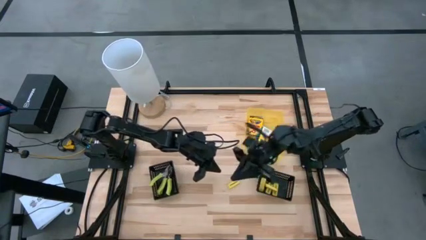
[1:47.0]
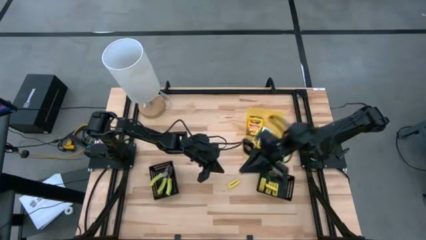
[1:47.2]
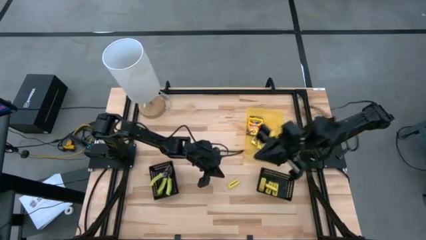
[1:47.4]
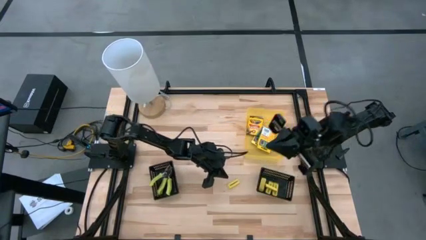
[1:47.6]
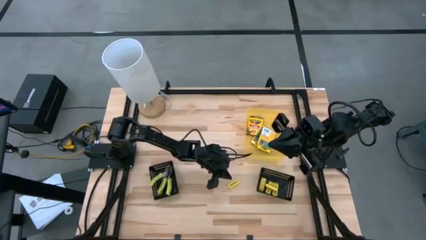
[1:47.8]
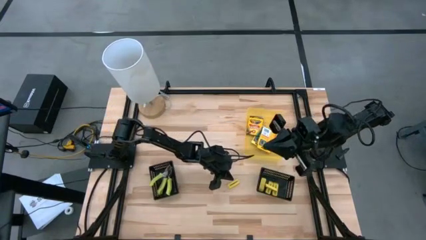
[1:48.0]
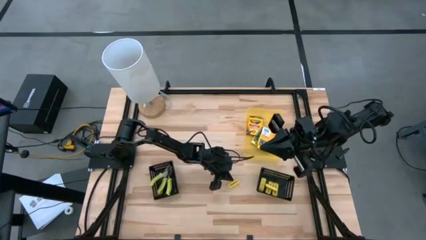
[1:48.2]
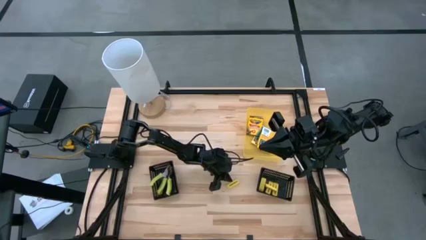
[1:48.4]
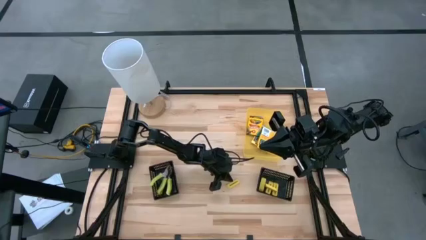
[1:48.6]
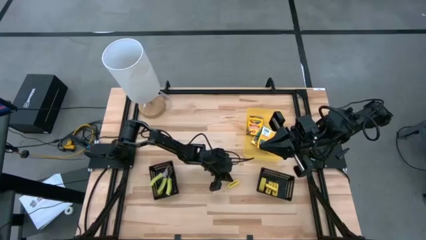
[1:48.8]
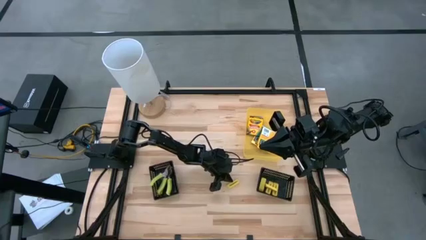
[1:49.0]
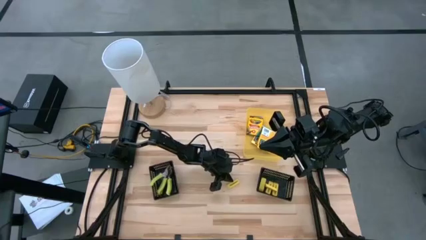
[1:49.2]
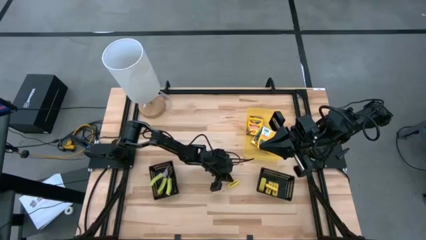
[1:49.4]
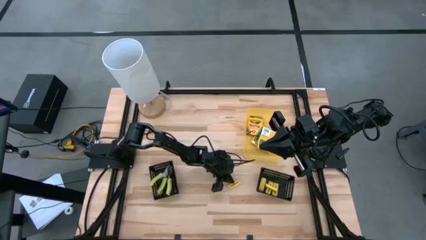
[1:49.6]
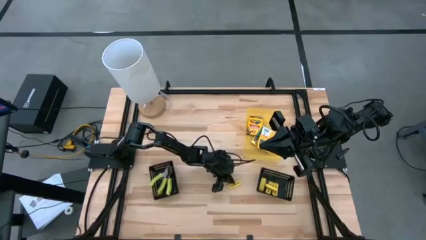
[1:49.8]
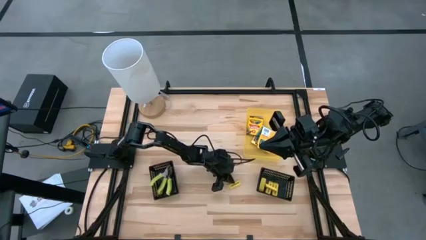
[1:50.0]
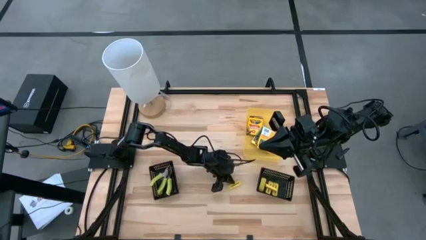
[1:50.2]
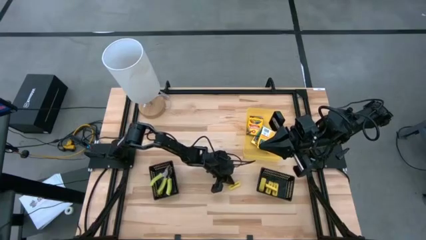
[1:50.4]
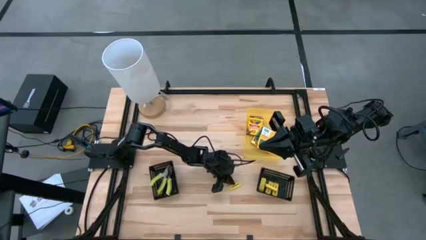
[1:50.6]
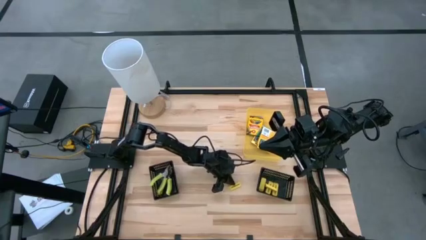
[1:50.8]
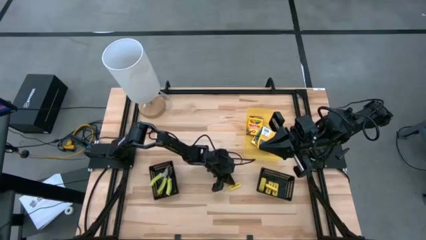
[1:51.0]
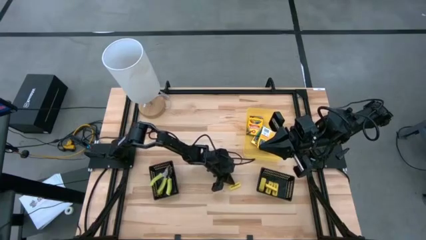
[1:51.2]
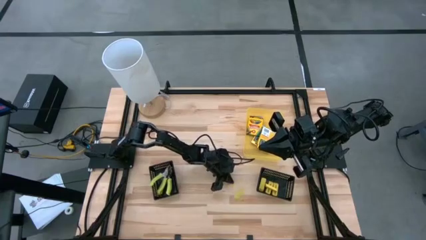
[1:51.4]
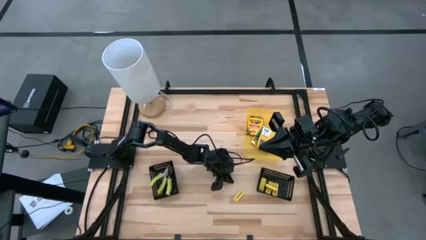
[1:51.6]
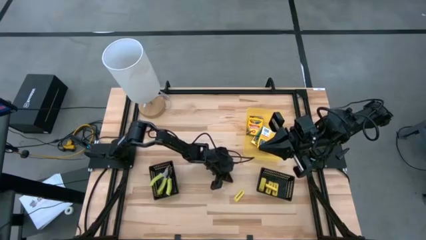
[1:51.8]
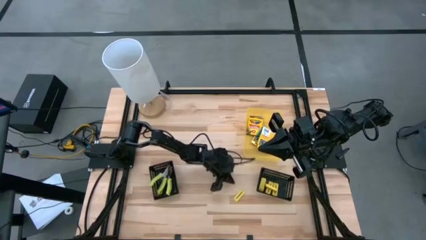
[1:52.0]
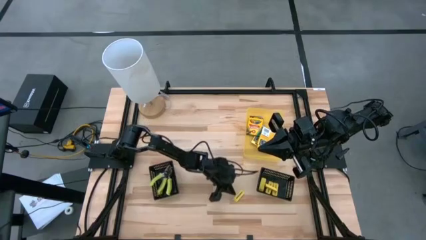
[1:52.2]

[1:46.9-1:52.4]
Task: Pick & Place School Supplies
Put the eraser into the right black bin

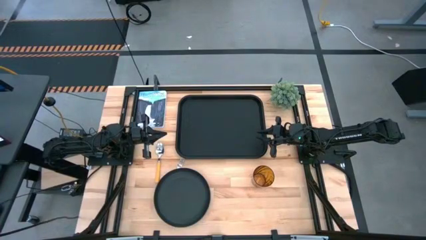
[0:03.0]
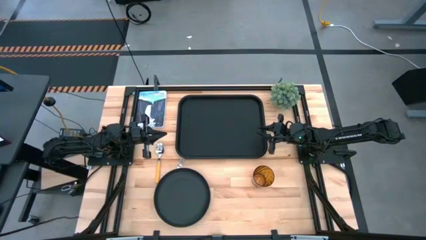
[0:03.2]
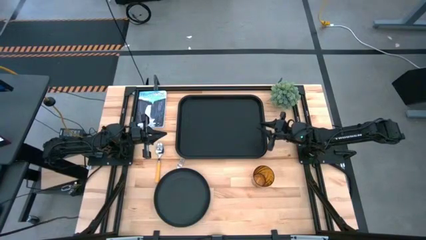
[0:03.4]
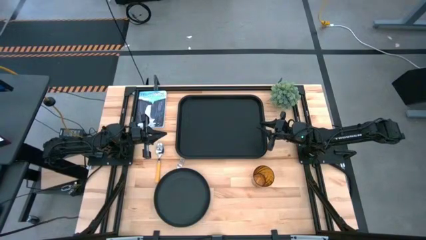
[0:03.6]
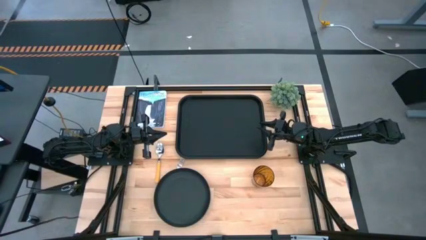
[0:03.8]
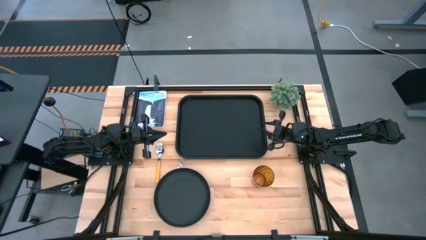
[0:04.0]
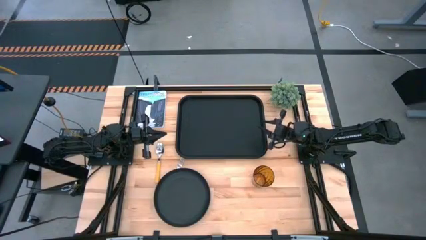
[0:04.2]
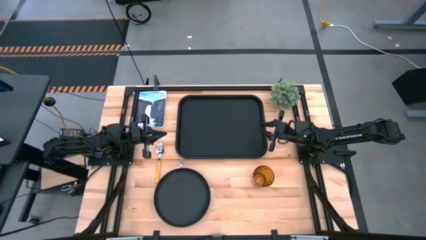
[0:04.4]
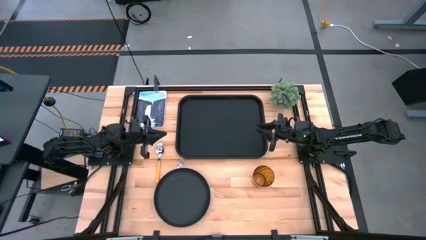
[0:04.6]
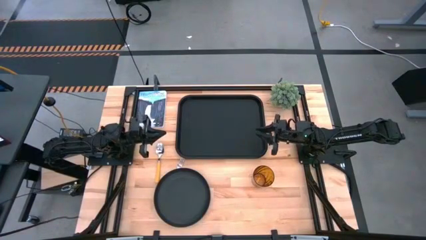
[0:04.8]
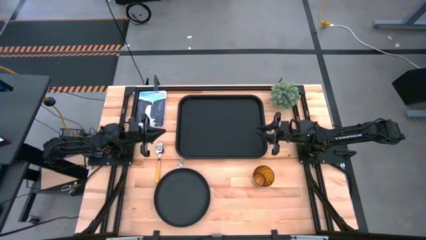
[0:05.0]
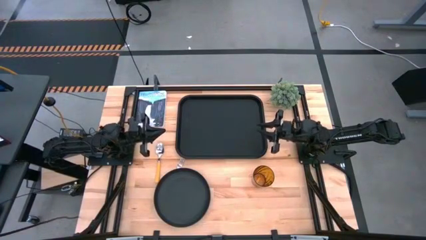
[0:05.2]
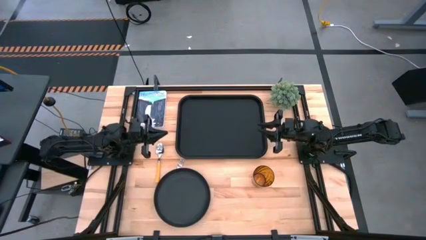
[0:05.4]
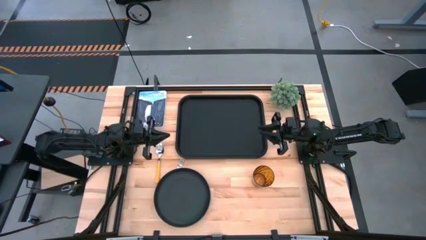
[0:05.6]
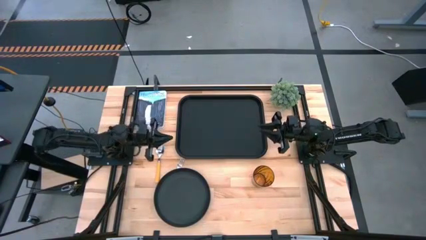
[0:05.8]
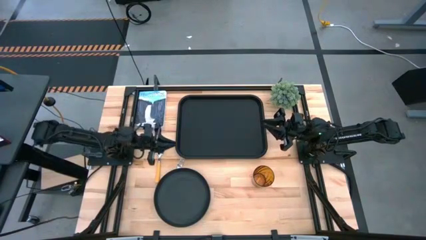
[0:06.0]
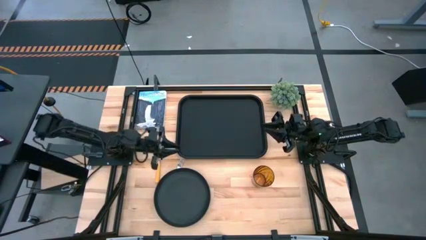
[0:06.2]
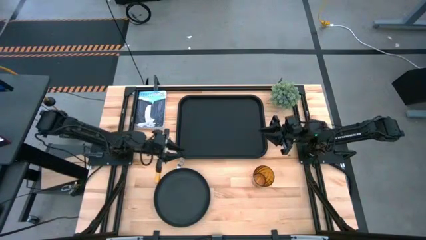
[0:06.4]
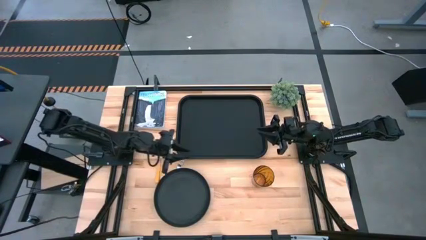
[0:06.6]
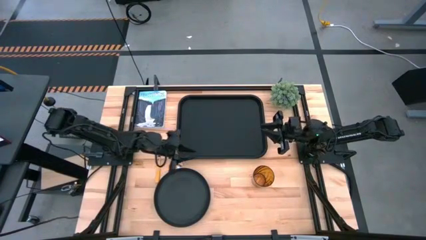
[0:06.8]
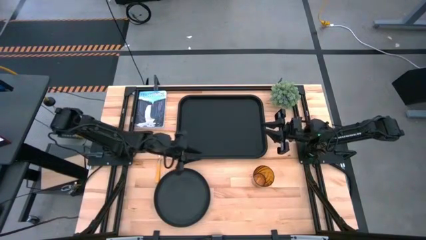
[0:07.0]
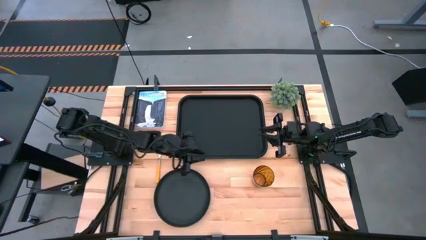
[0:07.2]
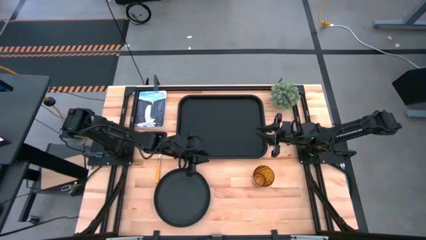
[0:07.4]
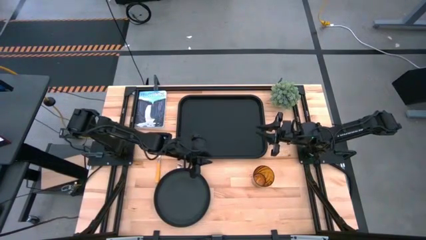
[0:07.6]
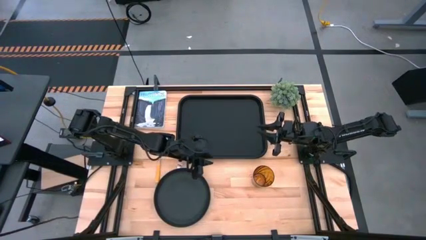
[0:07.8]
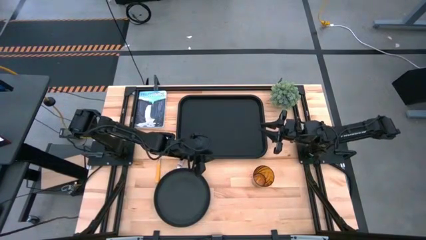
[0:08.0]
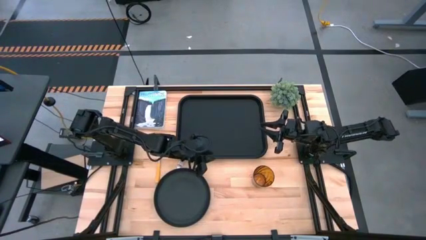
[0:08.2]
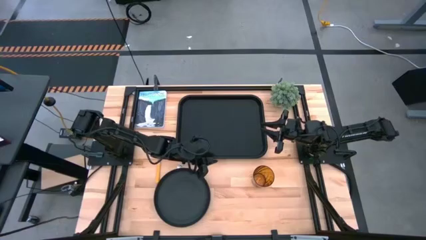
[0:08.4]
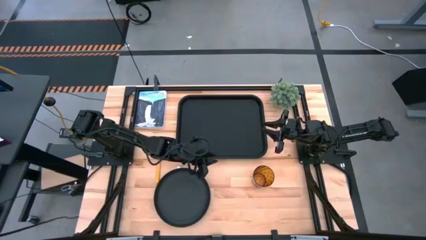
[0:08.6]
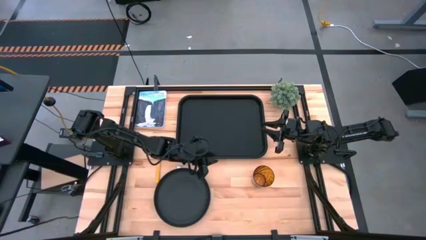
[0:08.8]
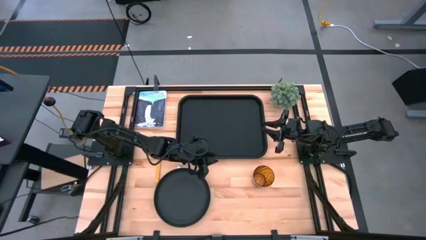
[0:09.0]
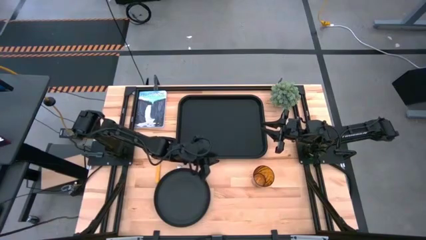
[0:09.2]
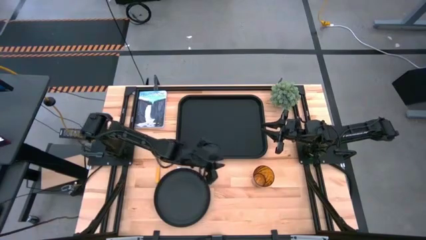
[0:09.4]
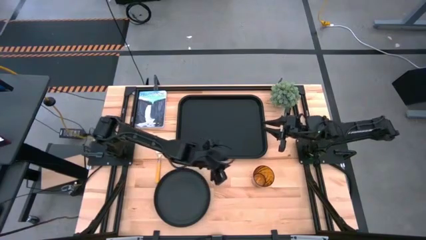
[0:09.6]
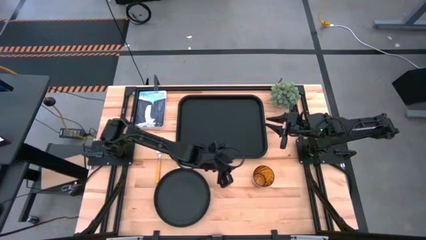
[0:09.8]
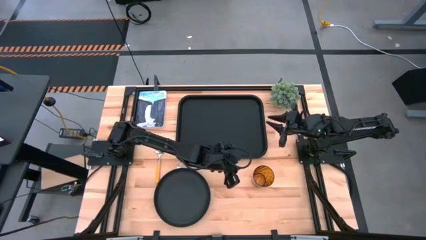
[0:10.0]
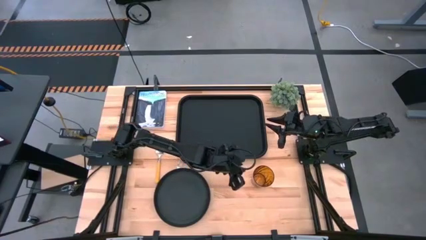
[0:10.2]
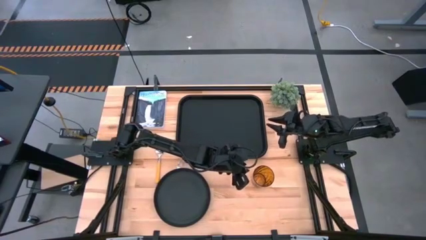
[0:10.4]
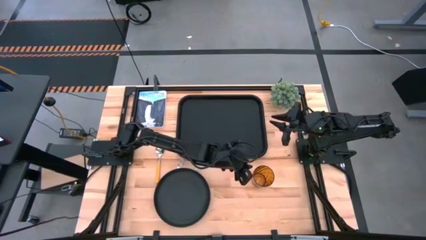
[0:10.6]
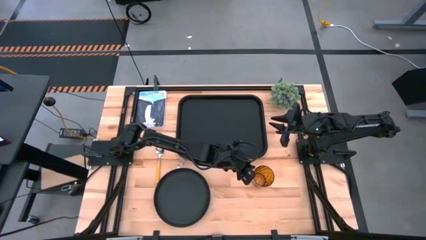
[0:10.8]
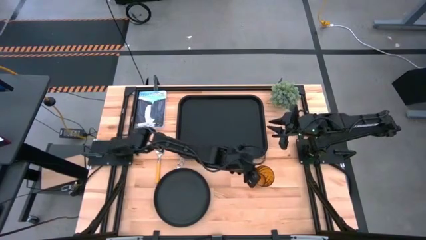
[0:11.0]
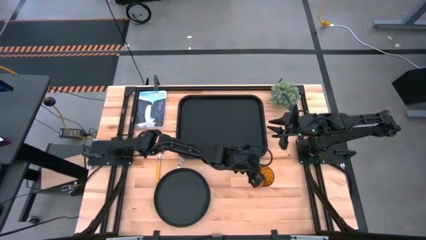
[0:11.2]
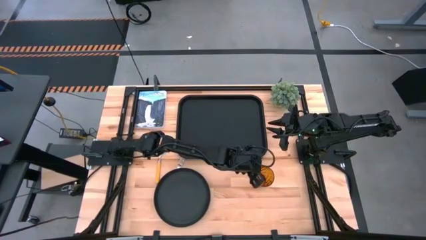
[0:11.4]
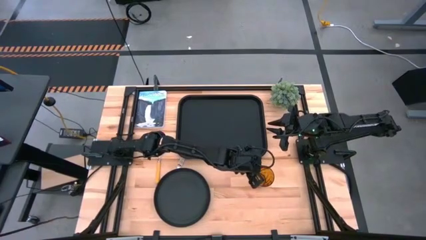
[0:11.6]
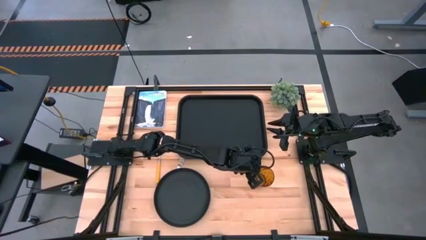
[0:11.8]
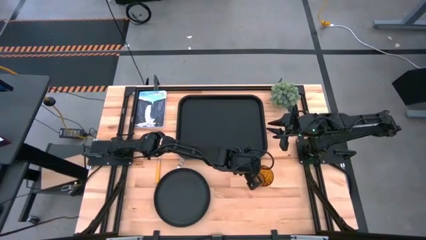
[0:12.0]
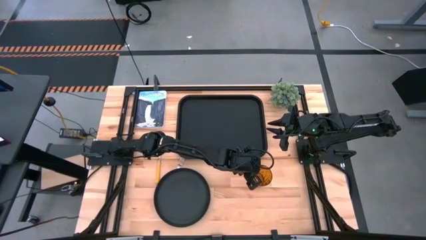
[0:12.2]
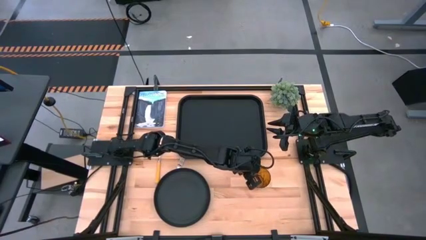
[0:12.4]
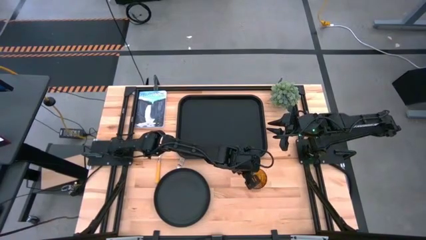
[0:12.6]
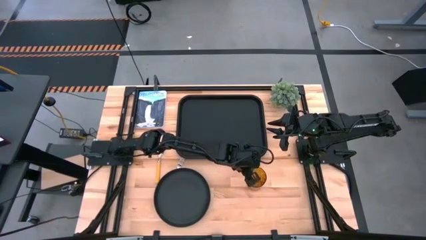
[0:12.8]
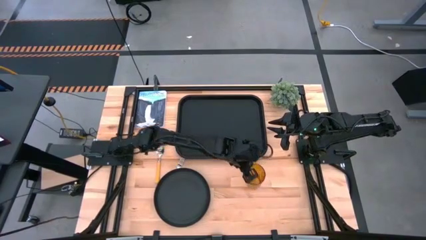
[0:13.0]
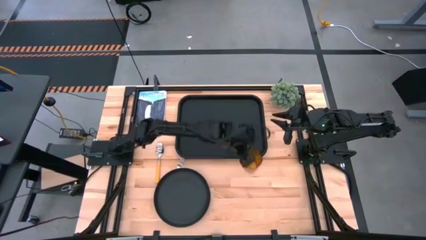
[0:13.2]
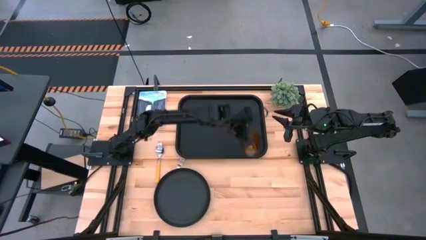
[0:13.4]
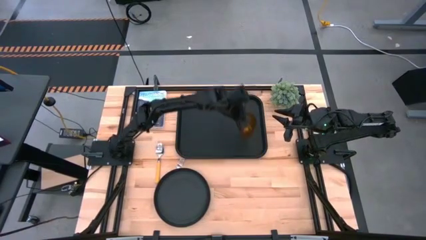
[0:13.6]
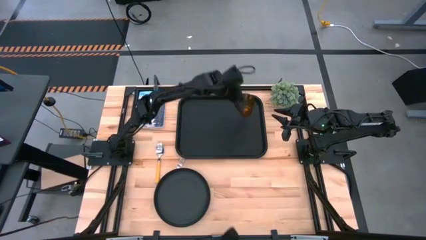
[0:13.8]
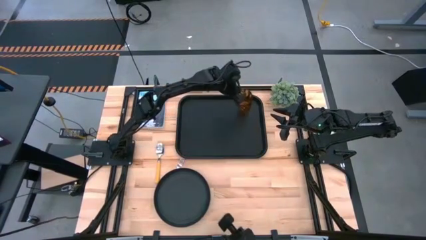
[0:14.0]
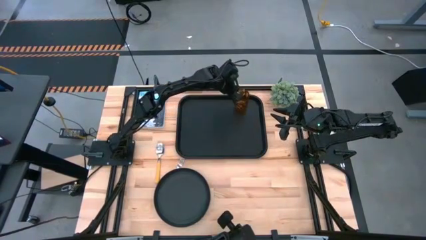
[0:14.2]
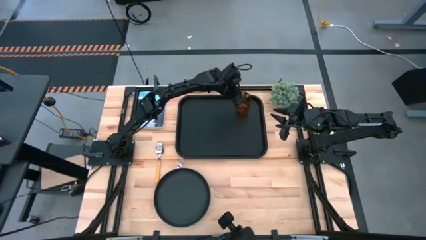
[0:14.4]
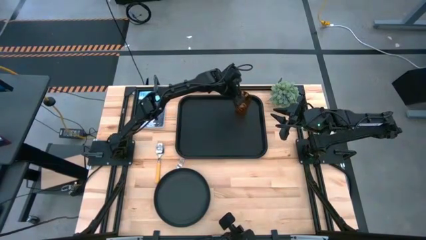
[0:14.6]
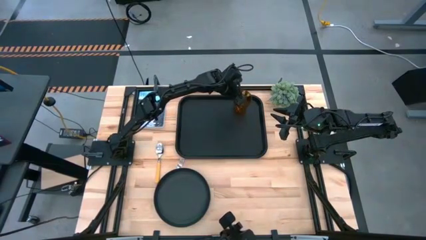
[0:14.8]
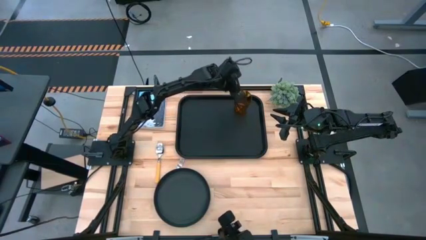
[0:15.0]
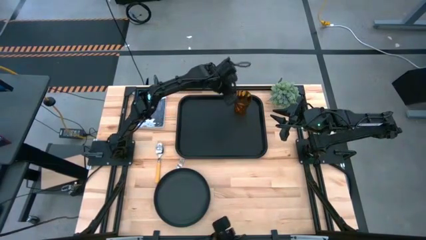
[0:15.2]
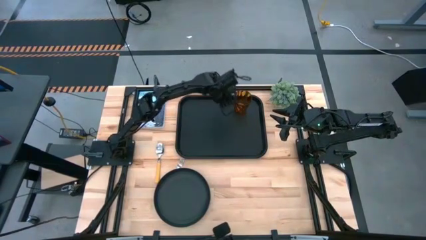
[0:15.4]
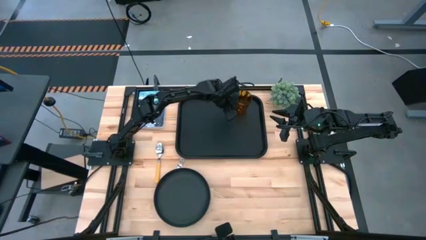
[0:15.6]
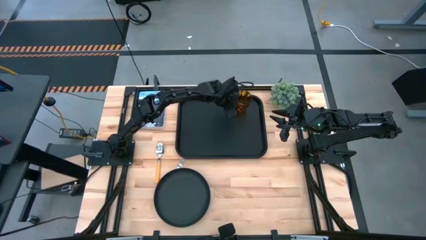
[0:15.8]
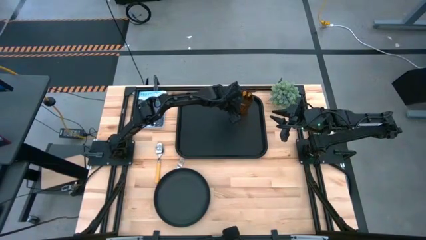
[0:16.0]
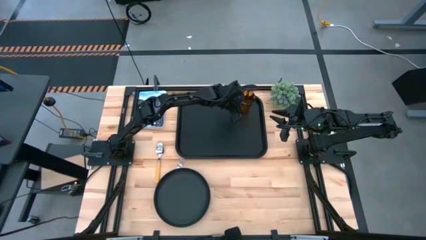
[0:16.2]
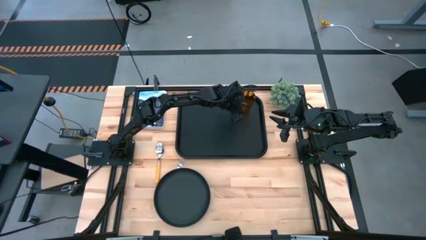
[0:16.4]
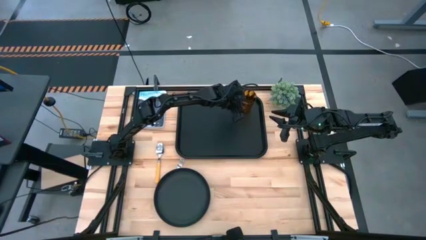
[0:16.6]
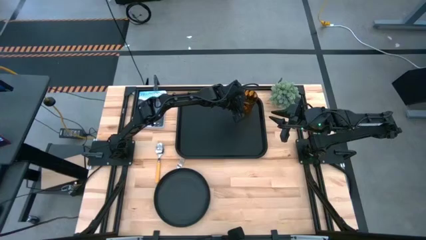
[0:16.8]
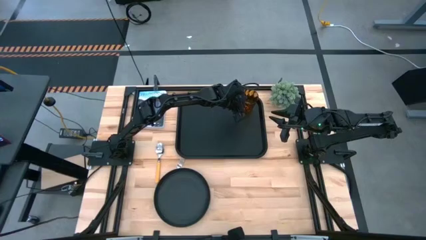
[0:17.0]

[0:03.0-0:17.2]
Task: Pick and place plate/cup/fork/spoon on tray
Put the yellow cup on the black tray
